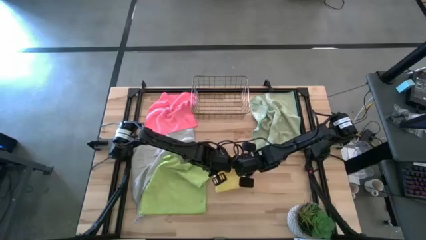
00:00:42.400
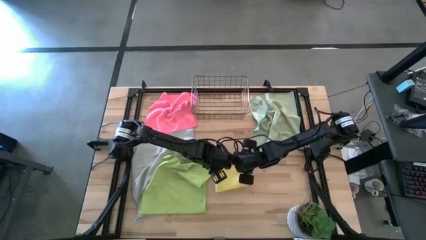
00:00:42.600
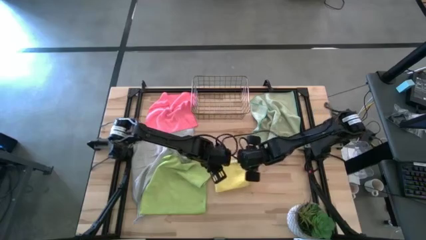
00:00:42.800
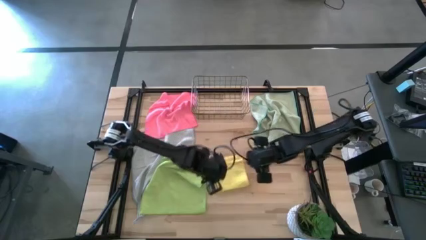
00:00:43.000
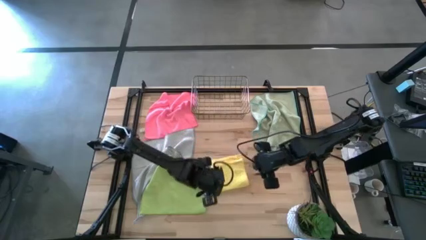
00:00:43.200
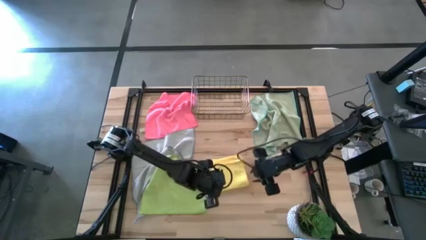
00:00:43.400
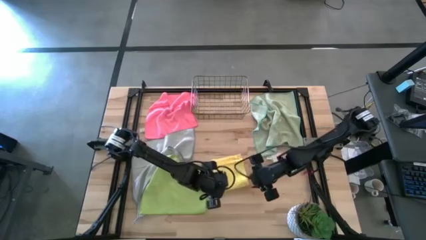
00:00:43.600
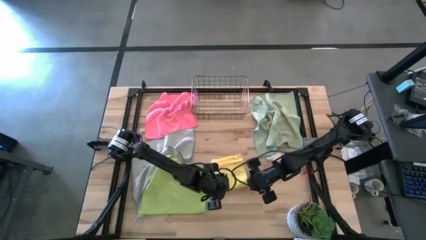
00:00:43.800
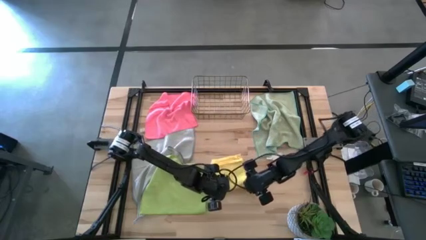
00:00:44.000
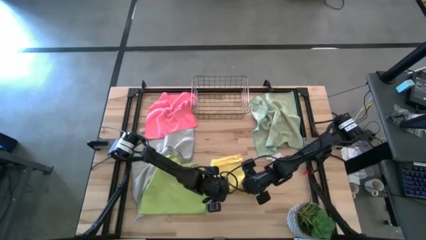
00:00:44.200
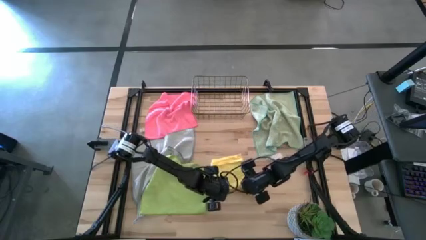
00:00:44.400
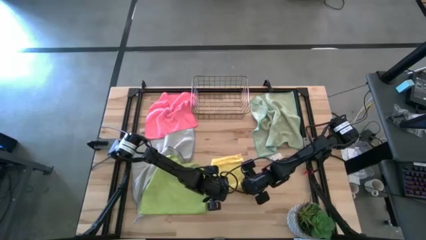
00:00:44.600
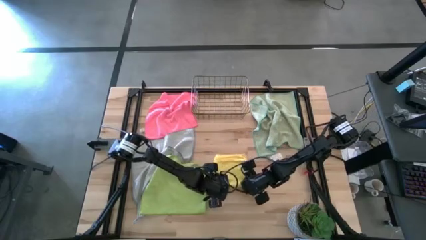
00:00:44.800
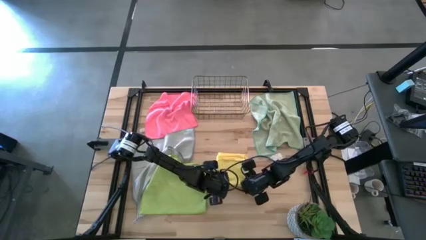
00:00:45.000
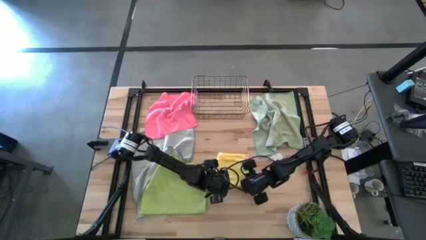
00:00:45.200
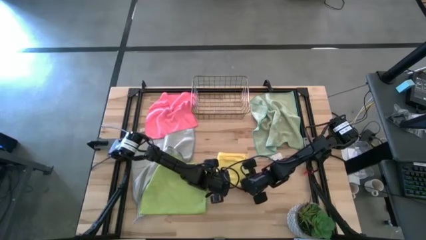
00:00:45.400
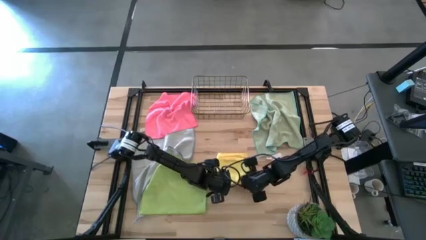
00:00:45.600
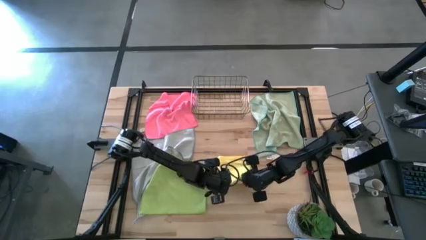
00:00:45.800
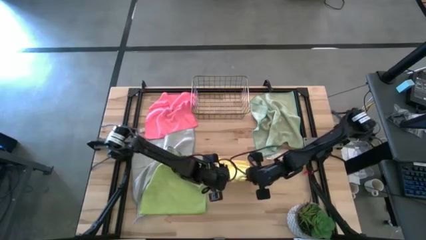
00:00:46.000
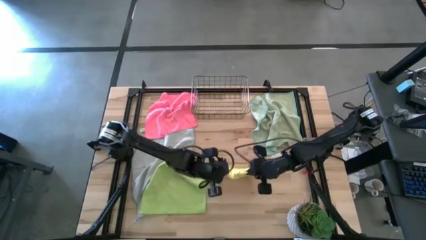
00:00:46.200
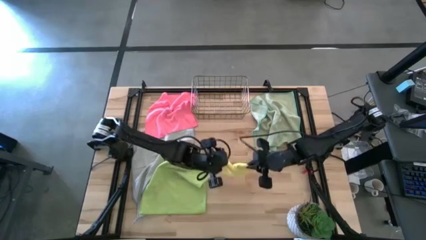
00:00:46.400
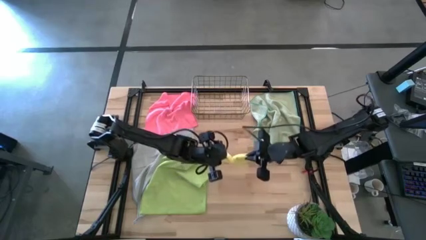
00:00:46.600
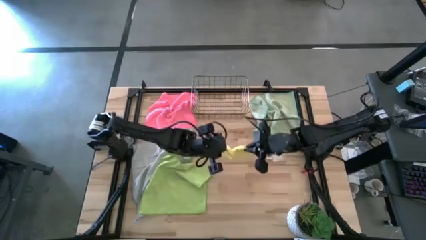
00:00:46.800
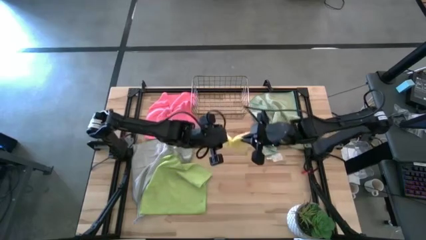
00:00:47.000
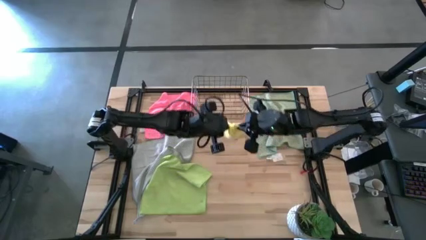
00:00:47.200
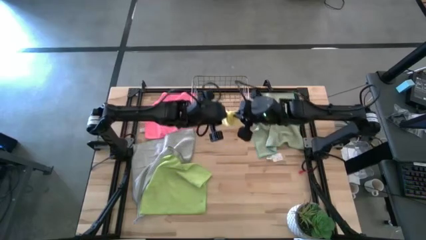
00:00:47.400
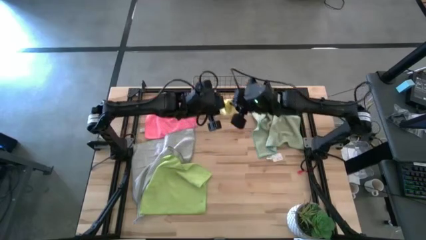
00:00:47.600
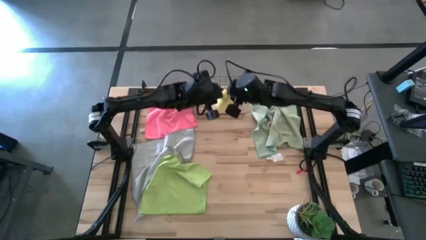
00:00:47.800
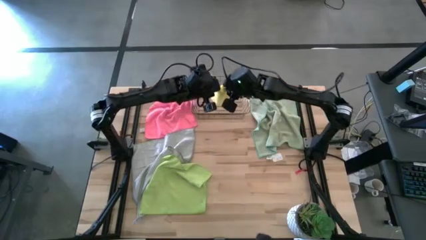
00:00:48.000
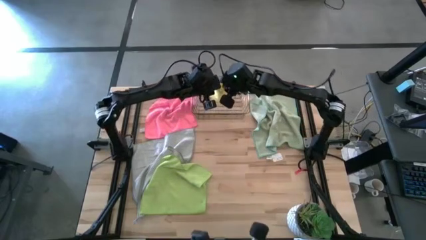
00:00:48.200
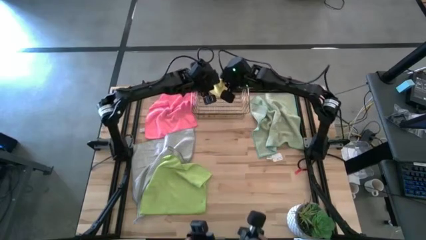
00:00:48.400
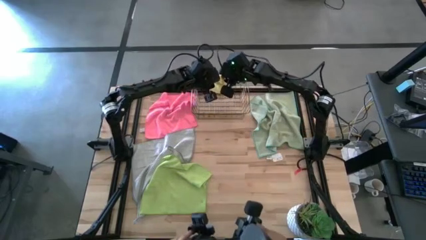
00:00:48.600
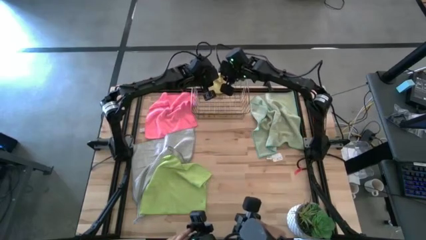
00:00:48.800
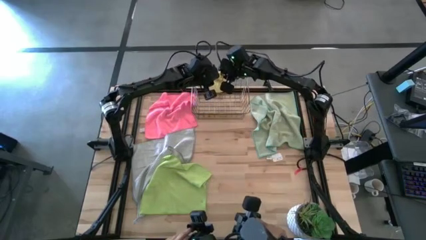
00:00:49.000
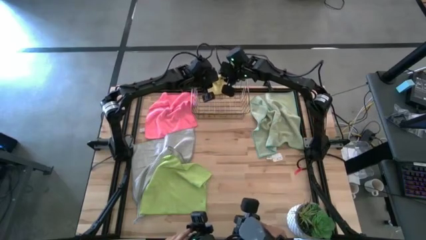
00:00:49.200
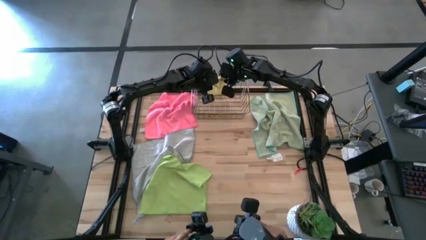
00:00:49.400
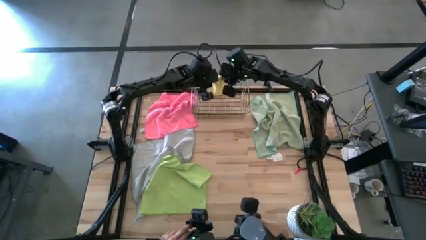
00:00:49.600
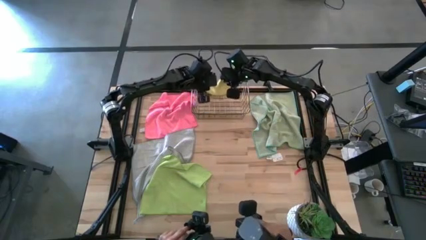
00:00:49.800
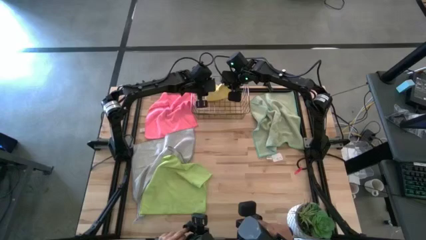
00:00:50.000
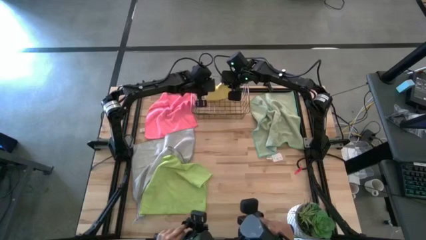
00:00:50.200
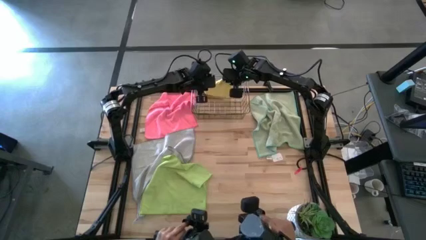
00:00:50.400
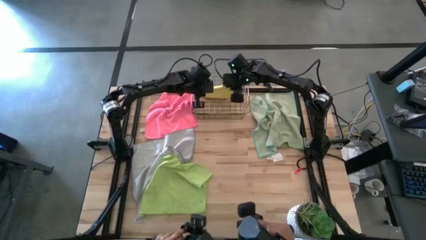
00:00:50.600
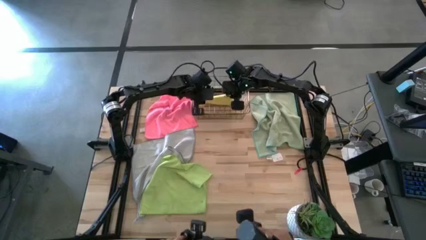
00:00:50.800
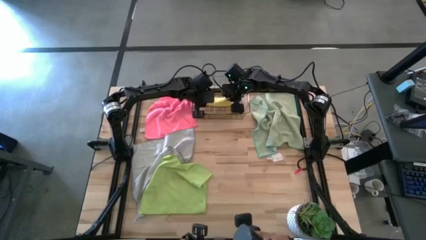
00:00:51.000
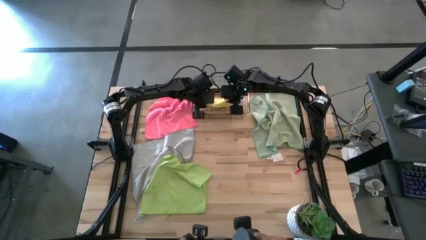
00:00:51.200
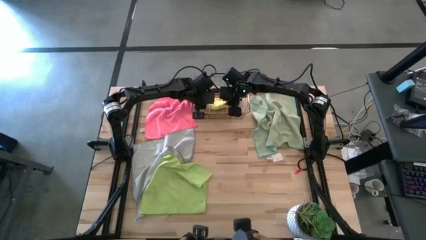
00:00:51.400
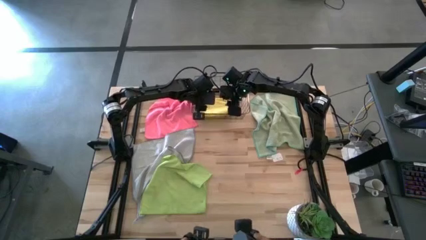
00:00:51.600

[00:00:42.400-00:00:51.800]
Task: Fold microfiber towels
Put the yellow towel into the wire basket
